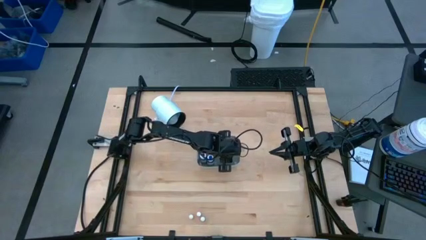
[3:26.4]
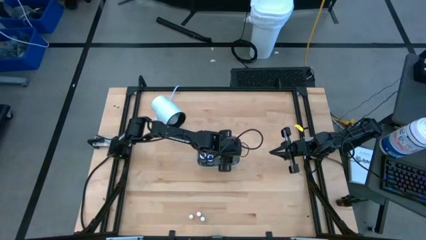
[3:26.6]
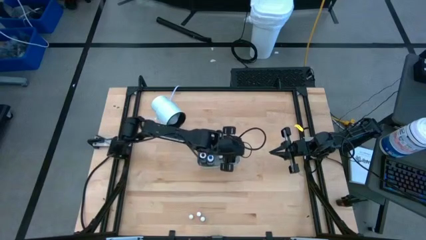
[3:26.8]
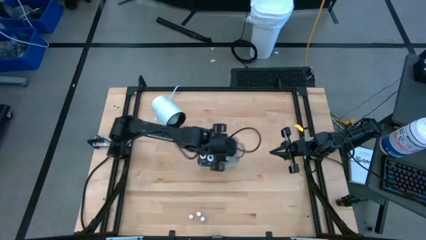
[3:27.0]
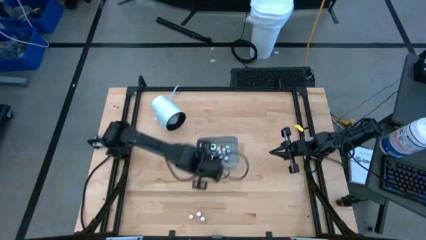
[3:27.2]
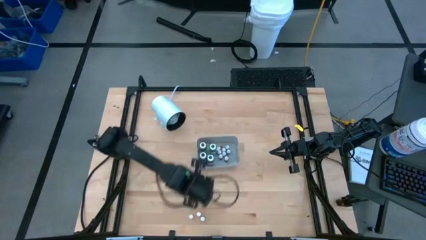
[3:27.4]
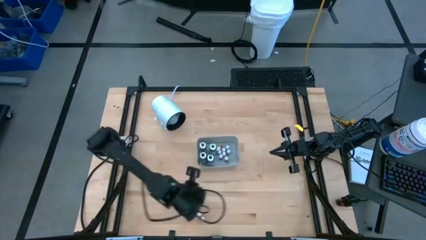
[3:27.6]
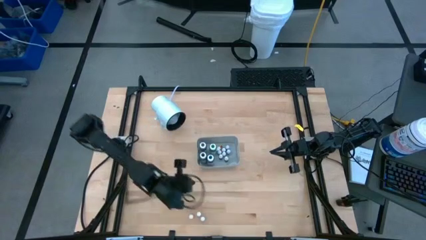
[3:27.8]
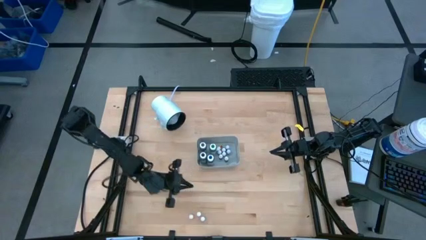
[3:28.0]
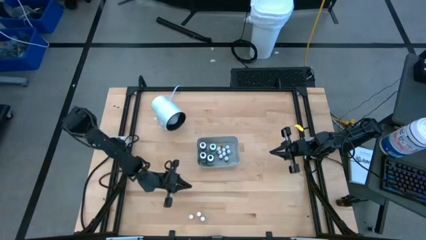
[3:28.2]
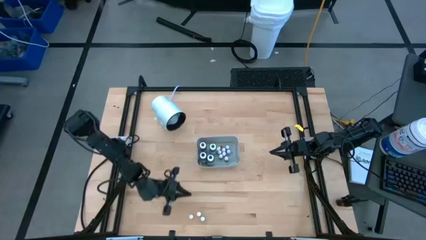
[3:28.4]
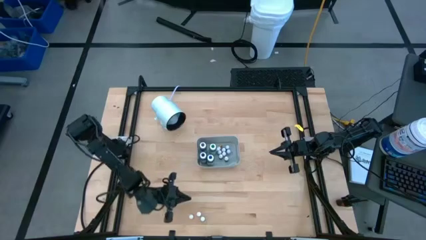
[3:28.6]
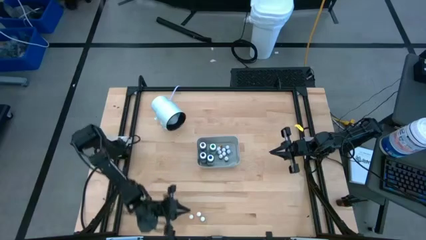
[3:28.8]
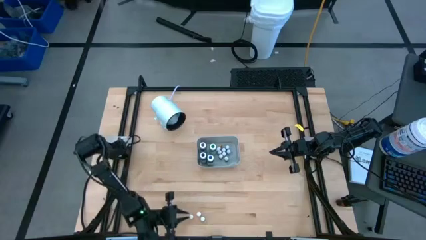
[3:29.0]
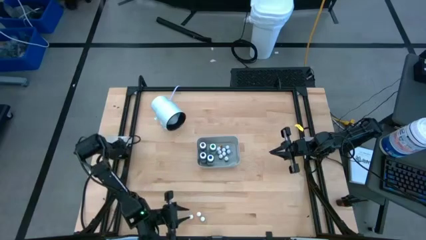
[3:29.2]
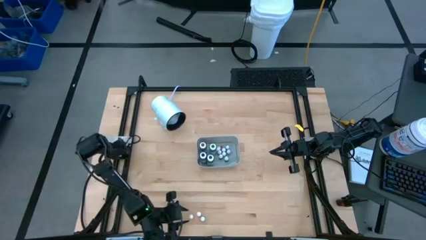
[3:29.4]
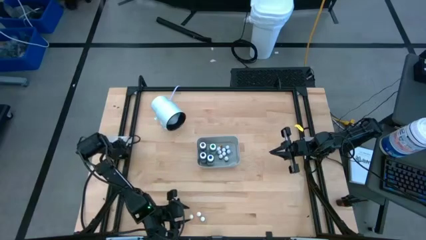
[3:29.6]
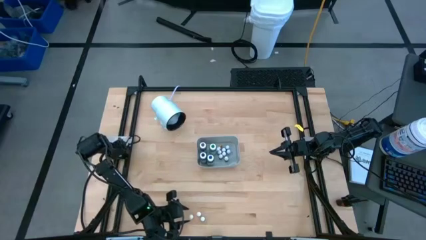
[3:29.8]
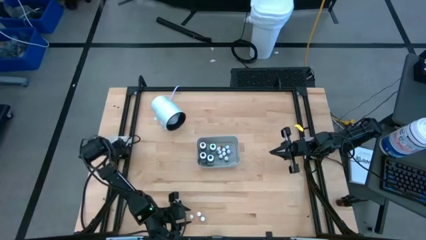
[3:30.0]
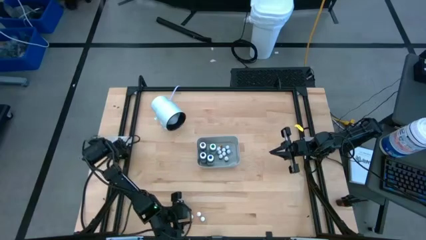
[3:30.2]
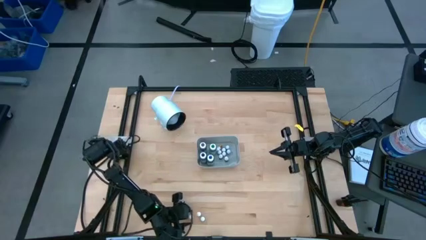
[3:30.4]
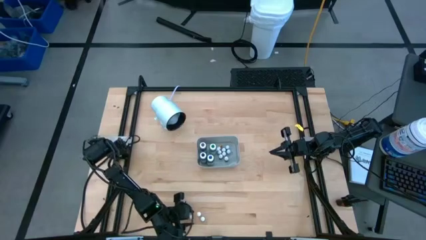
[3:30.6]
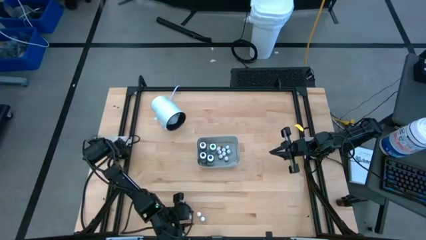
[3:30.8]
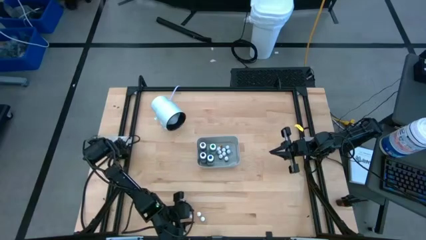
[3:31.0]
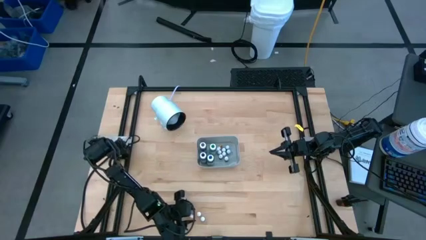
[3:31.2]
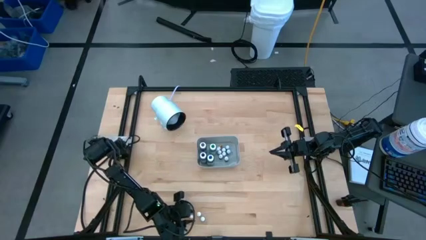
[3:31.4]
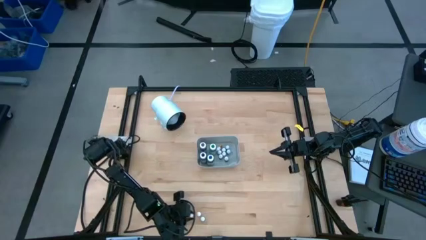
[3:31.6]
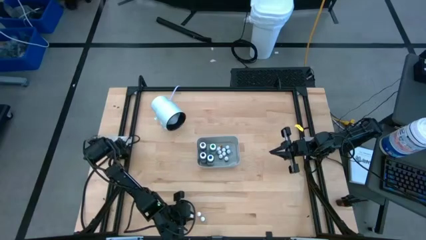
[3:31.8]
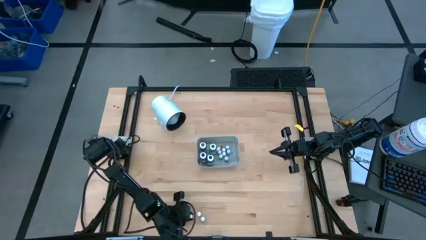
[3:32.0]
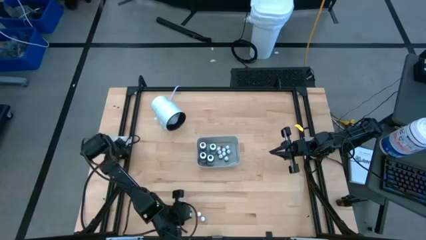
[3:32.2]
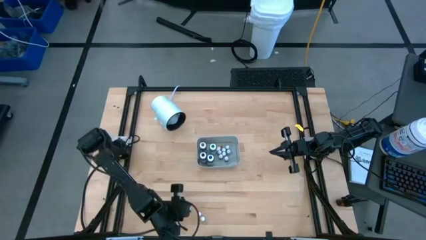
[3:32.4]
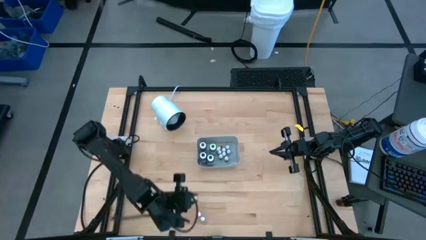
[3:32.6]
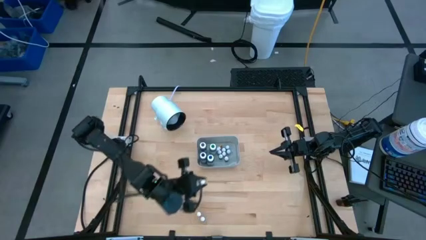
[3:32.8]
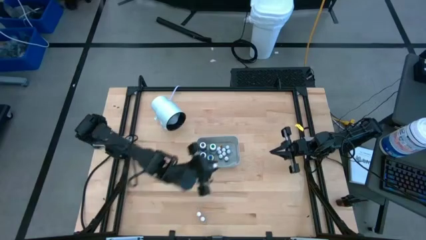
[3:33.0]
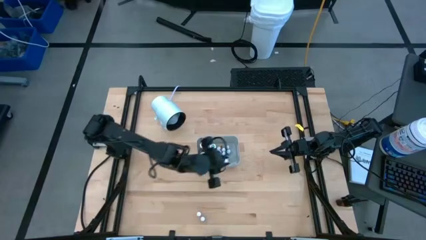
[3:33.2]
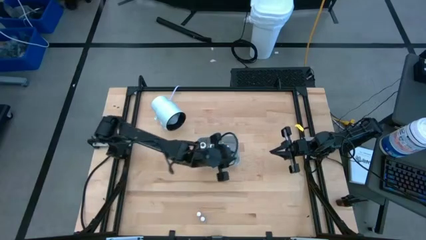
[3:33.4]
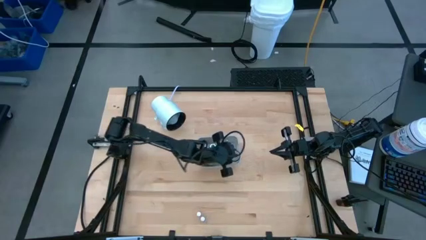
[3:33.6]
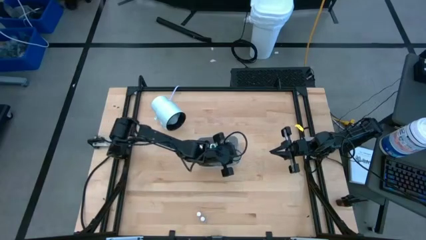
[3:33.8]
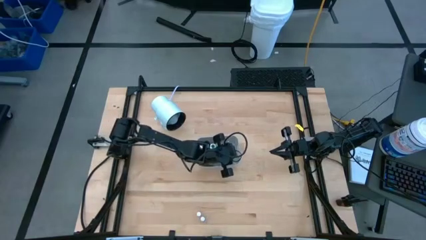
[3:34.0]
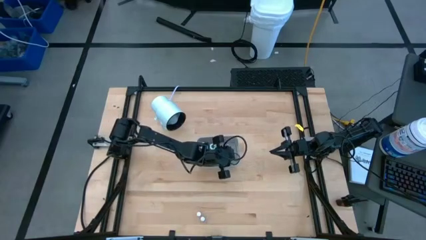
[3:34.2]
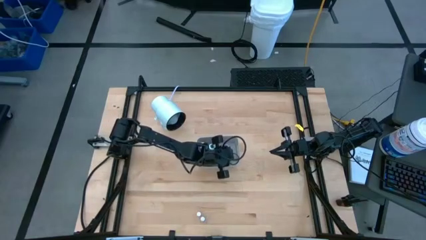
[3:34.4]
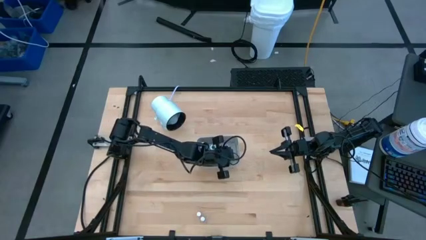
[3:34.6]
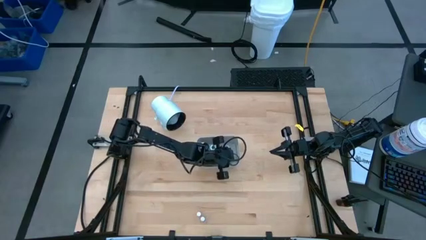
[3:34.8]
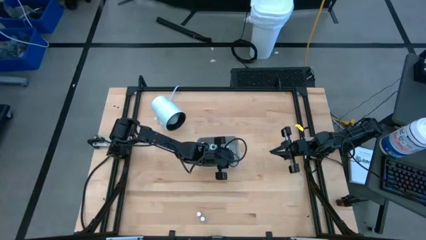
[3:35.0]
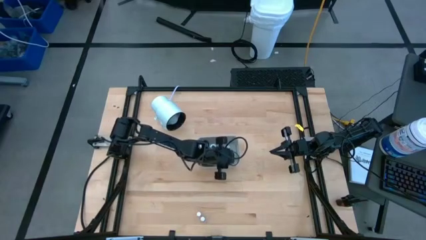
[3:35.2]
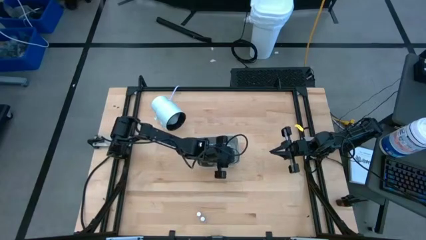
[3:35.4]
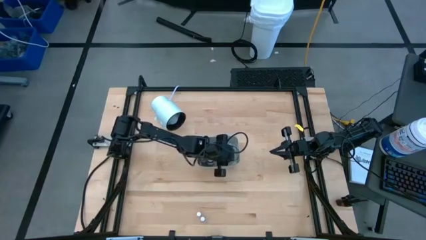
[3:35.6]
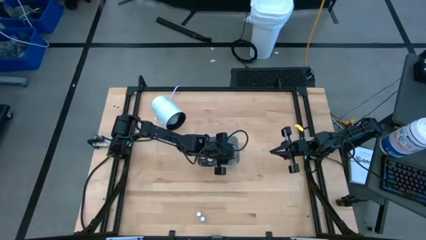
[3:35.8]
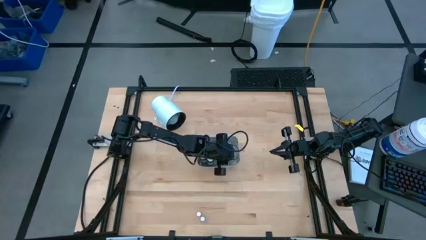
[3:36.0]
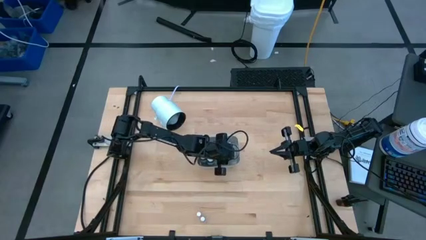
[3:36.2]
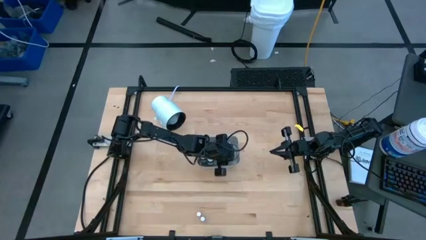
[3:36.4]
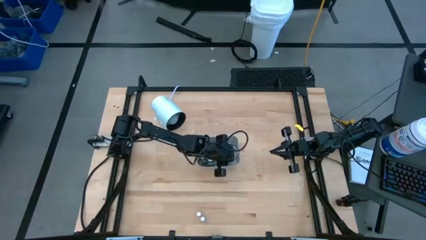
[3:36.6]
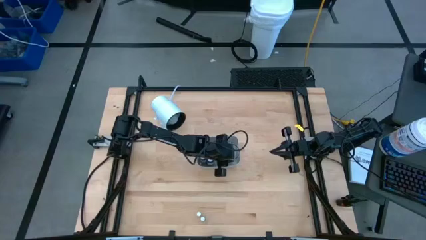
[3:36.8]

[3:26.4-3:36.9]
Task: Pick & Place food coloring
Put the small orange food coloring bottle into the gray bin

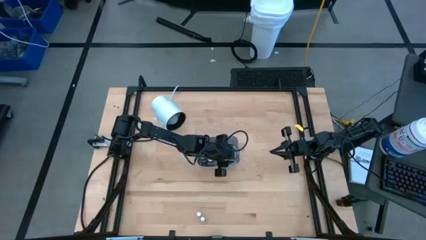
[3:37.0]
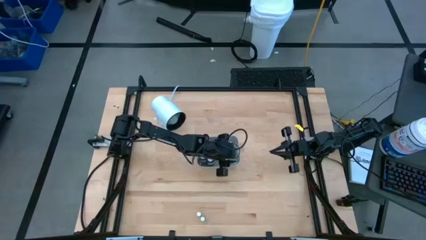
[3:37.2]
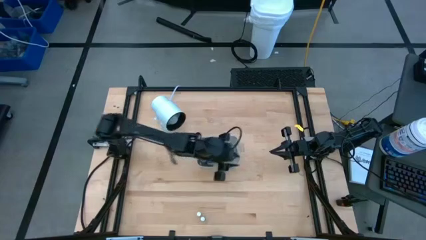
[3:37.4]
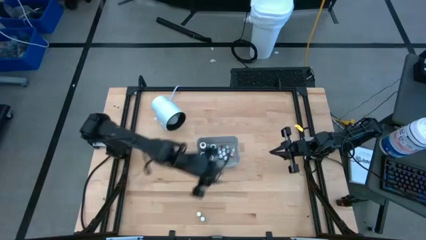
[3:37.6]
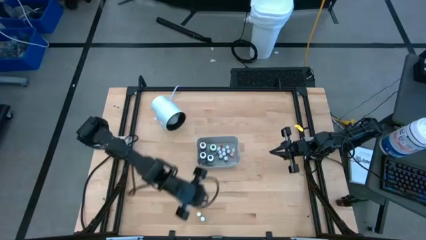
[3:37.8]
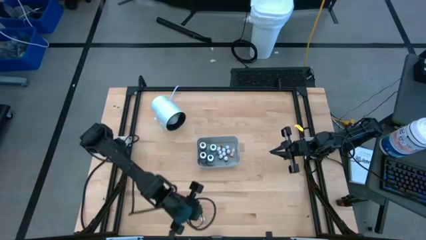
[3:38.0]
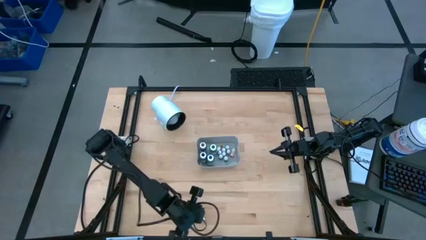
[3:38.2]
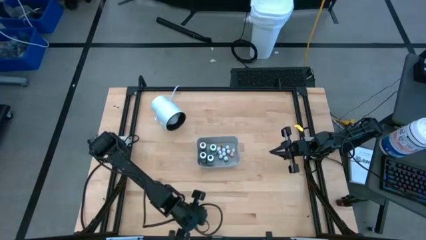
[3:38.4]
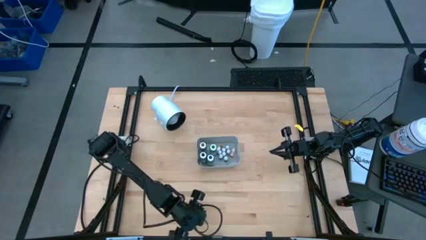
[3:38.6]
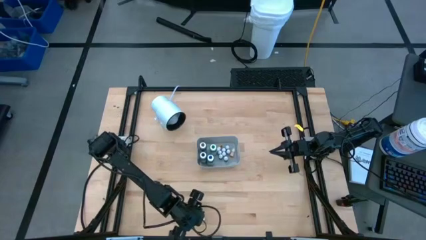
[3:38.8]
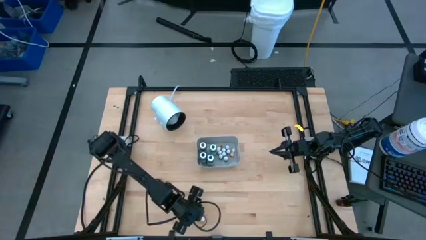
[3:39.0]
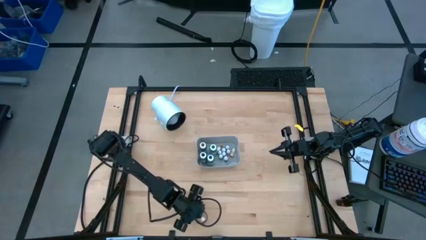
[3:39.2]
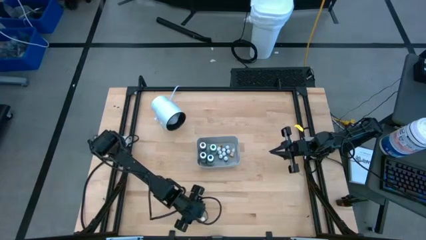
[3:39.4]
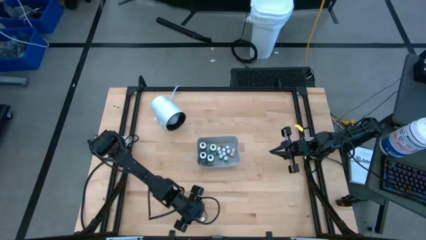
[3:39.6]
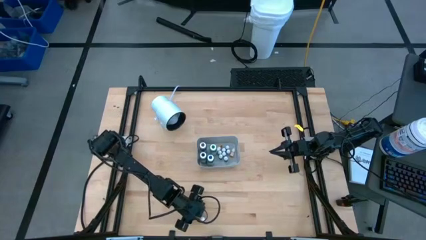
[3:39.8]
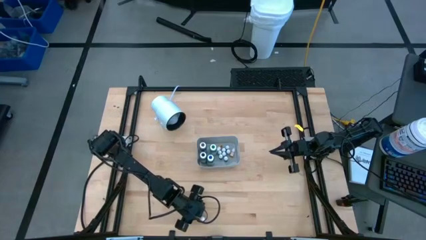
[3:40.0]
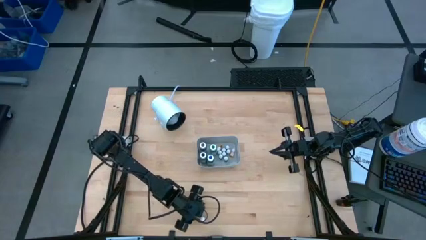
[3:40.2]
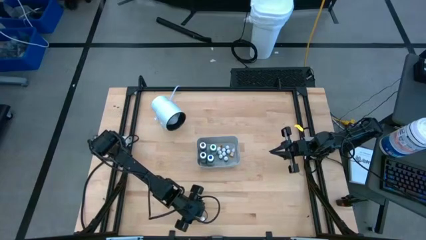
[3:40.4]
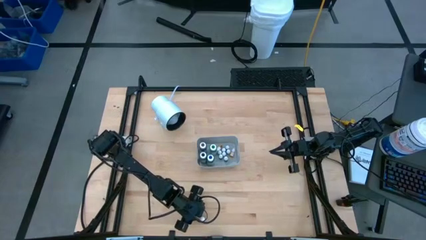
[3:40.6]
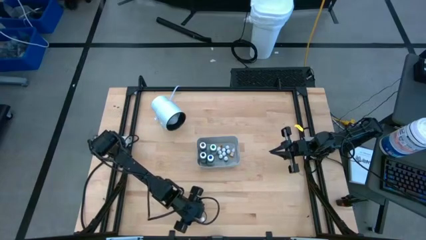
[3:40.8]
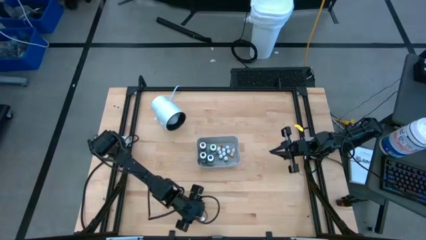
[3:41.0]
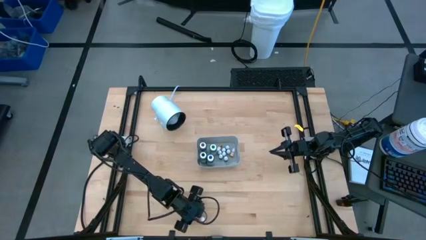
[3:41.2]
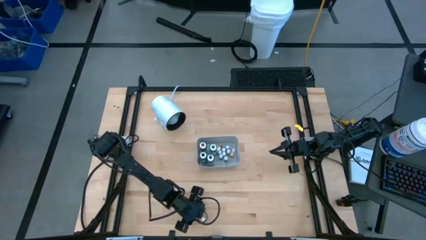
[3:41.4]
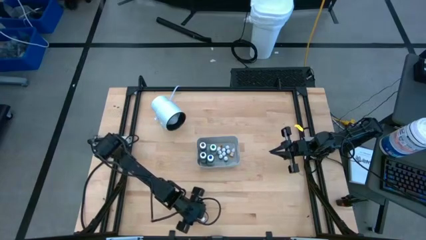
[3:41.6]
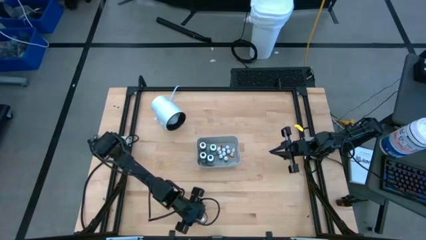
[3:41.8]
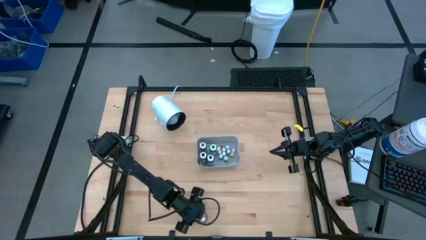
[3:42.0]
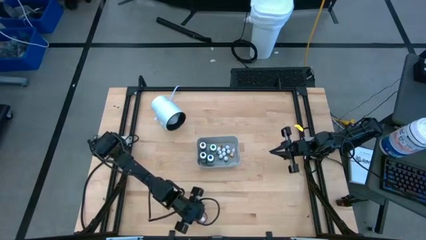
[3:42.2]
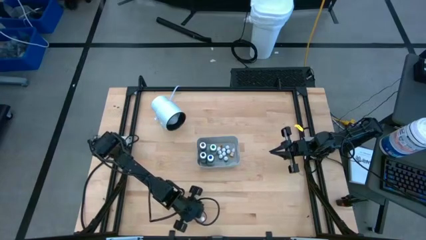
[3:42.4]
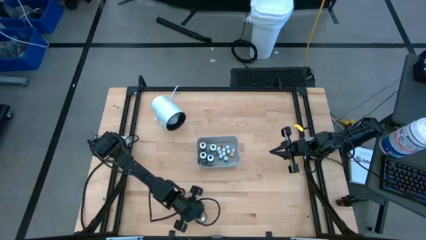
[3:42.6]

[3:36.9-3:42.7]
Put the small orange food coloring bottle into the gray bin
